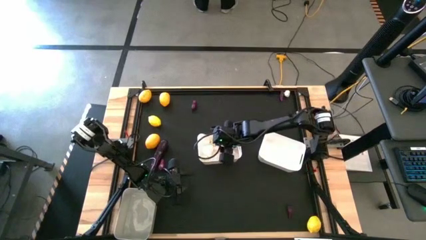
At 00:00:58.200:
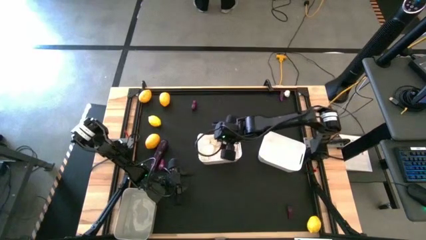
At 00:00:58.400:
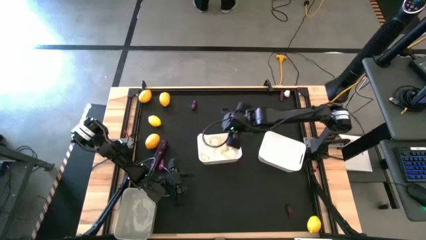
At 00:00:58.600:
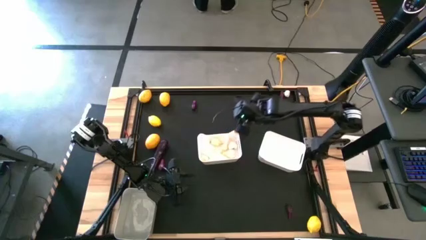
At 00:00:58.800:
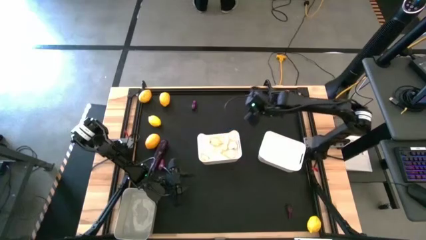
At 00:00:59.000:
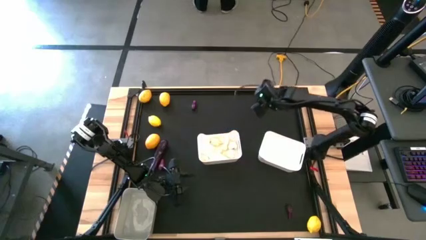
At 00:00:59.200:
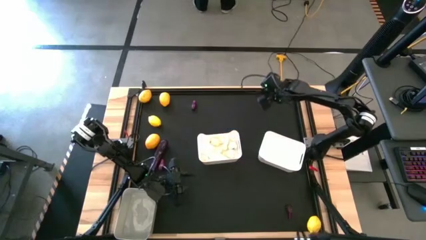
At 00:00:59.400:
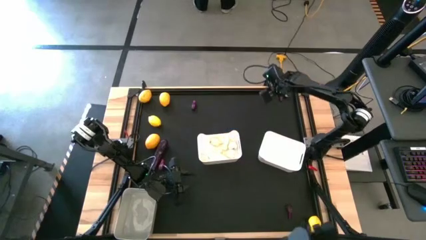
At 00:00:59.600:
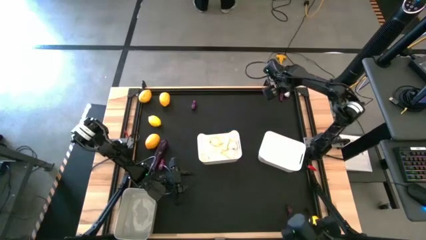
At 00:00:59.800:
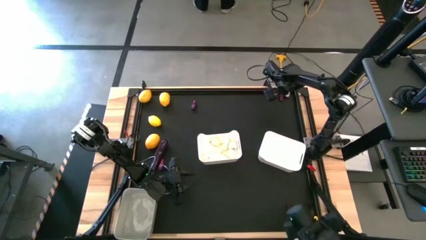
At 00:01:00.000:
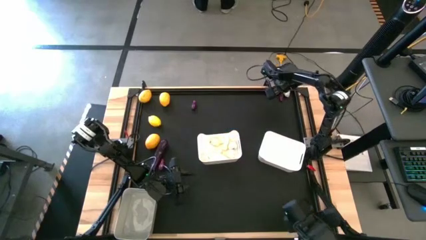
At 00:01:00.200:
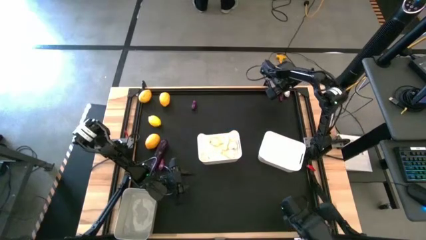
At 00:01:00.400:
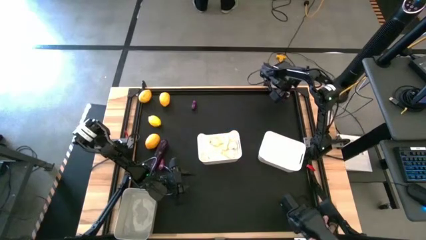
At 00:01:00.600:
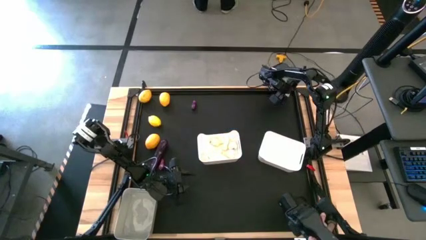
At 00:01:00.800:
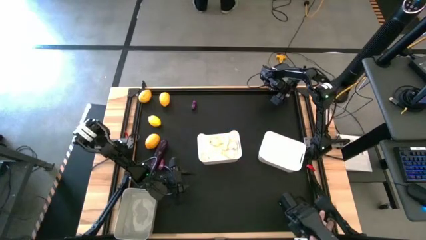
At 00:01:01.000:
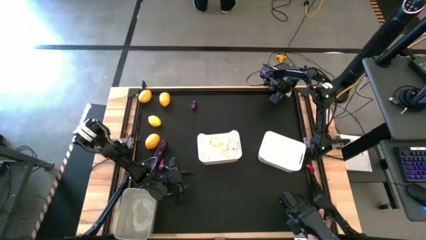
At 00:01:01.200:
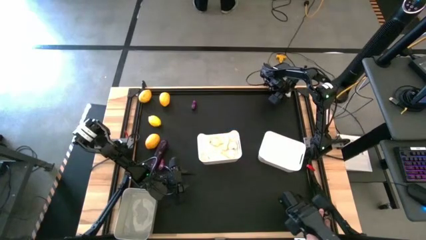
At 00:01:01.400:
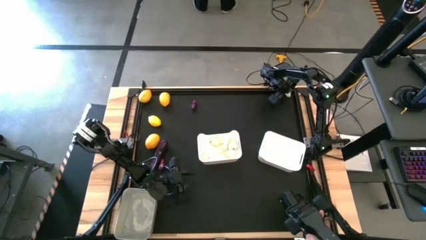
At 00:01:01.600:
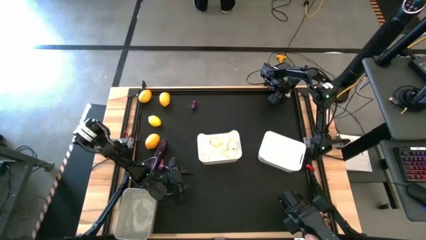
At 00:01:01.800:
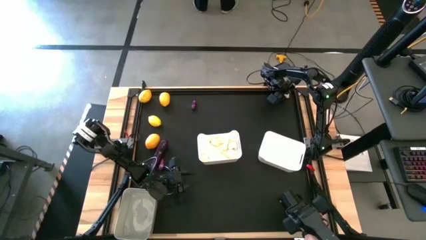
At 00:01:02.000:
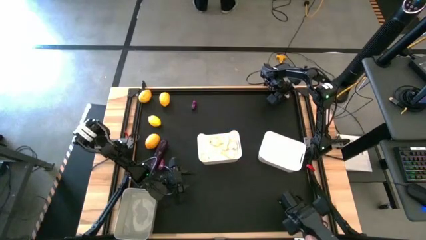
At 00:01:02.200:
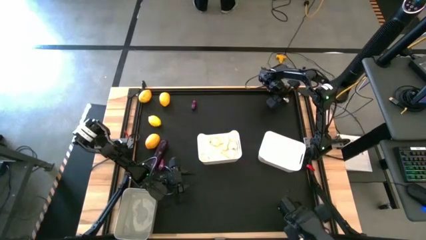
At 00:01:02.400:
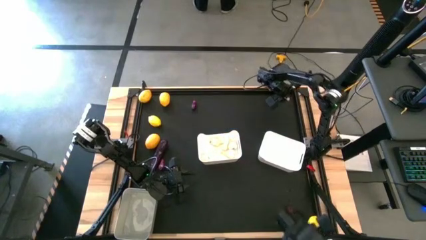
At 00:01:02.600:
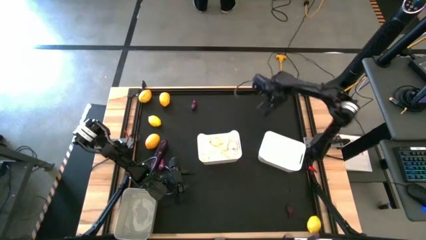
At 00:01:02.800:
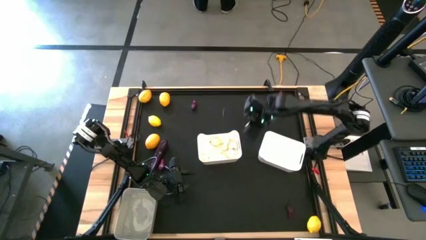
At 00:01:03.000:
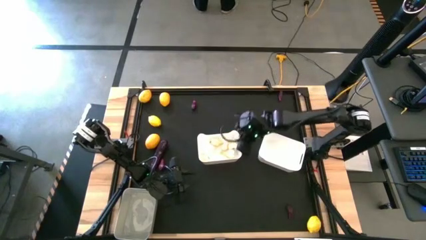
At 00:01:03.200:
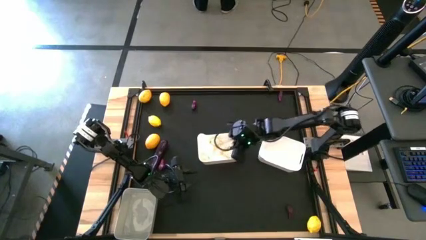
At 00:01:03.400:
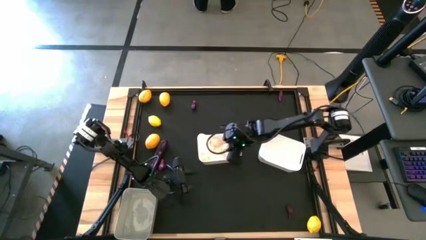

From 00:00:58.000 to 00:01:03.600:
Task: Sort produce into baskets
Put the garlic into the left white bin

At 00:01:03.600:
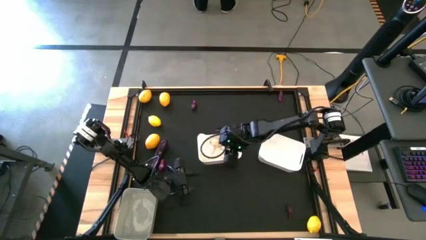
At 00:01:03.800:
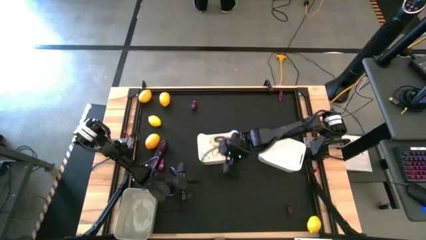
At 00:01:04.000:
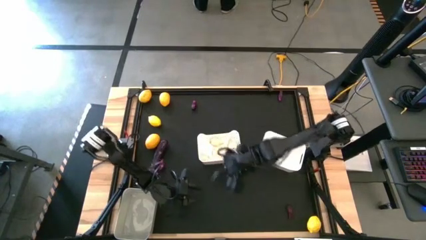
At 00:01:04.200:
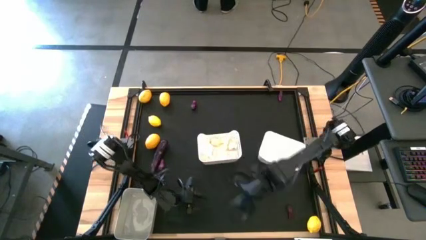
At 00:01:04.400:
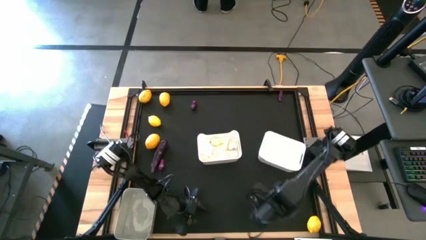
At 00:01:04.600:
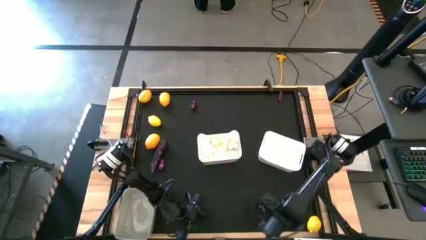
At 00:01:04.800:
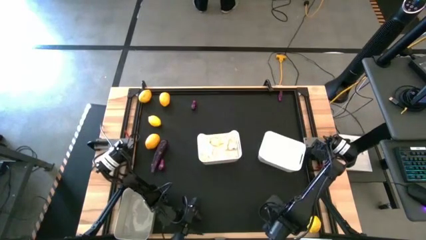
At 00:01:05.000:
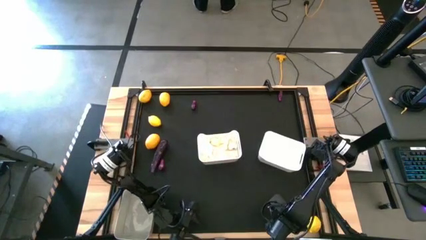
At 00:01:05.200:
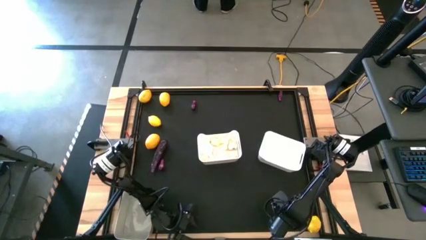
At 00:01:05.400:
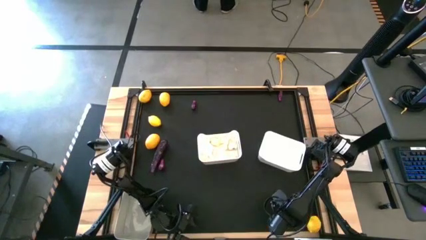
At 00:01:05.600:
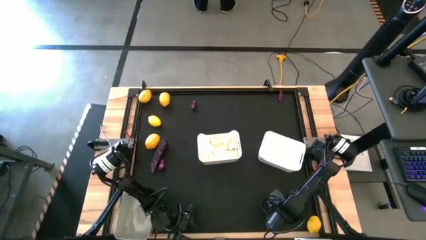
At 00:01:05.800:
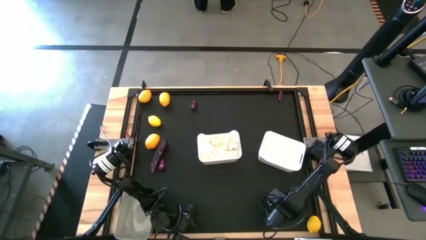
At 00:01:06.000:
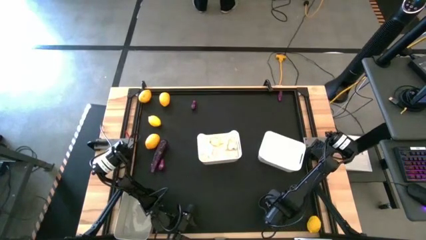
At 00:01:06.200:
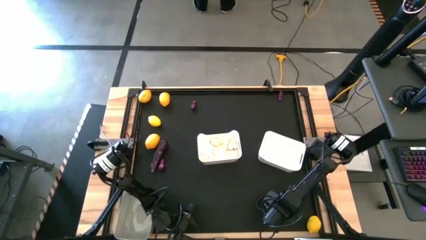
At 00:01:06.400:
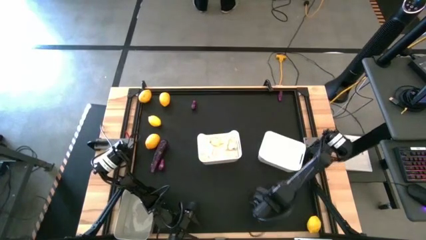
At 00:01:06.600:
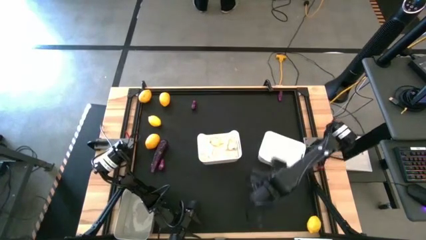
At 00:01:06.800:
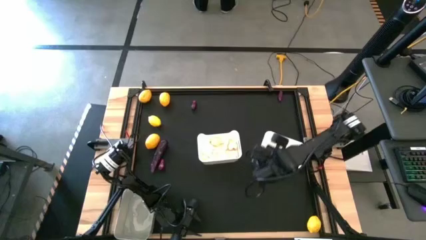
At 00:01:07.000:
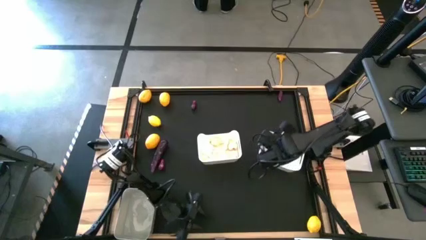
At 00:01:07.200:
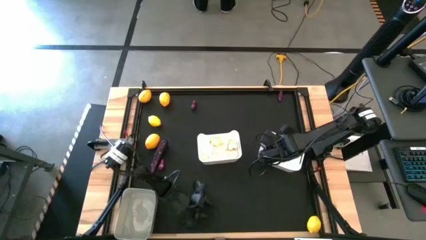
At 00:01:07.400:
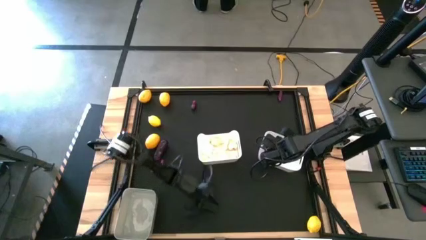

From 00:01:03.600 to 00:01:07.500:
Put the eggplant into the right white bin

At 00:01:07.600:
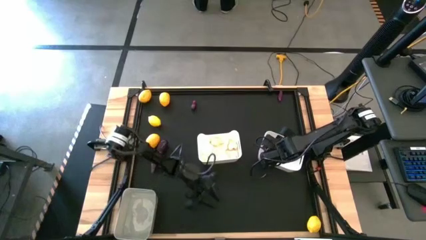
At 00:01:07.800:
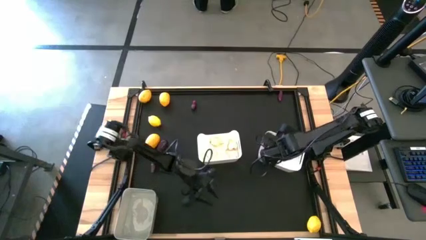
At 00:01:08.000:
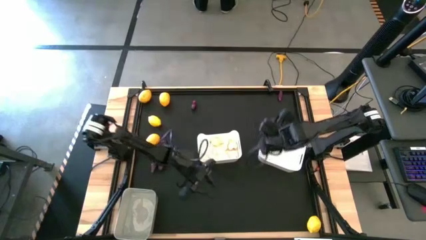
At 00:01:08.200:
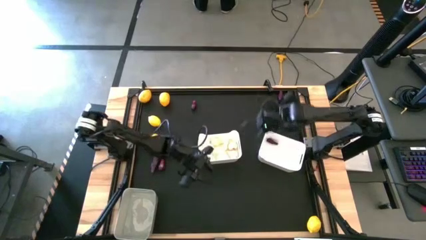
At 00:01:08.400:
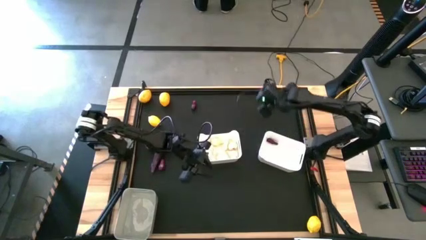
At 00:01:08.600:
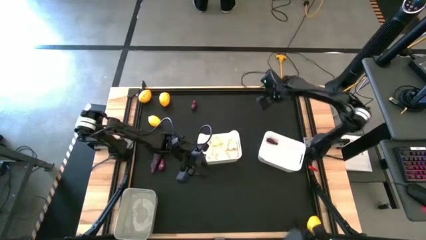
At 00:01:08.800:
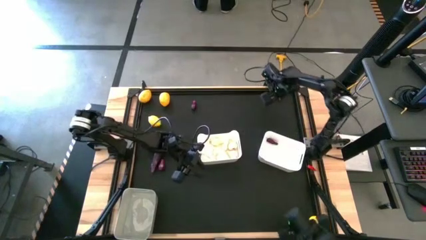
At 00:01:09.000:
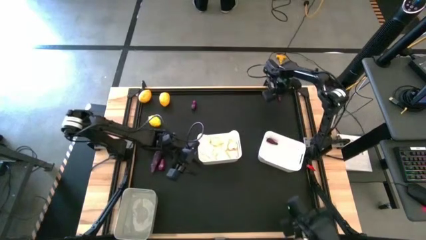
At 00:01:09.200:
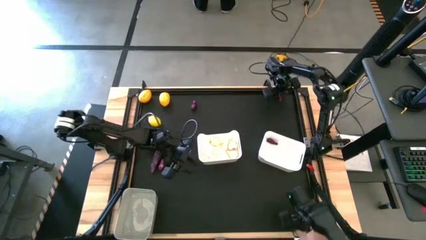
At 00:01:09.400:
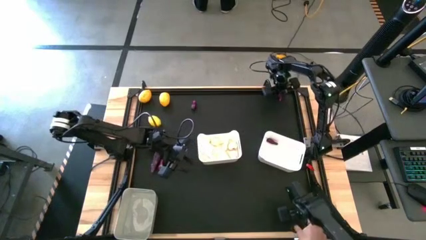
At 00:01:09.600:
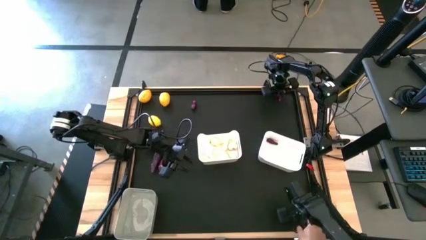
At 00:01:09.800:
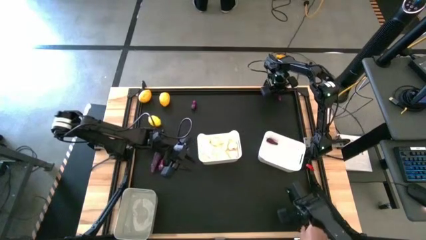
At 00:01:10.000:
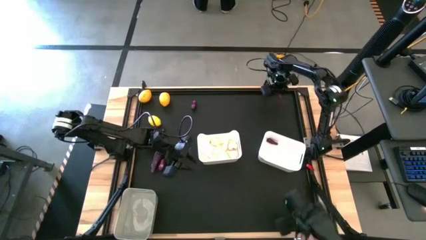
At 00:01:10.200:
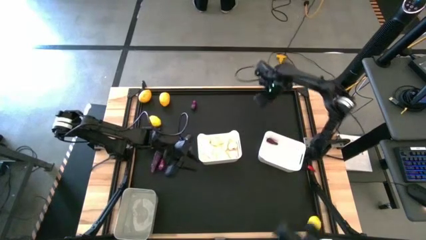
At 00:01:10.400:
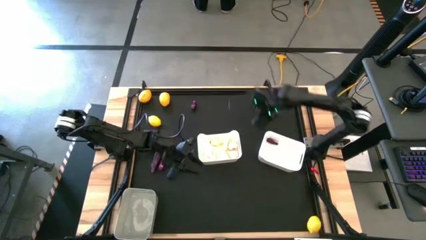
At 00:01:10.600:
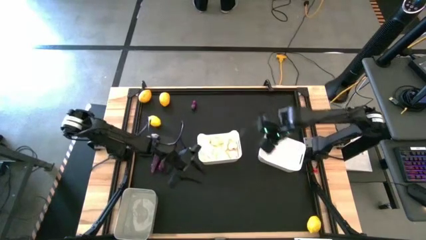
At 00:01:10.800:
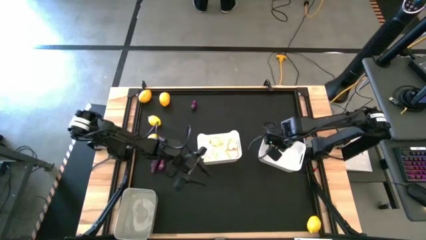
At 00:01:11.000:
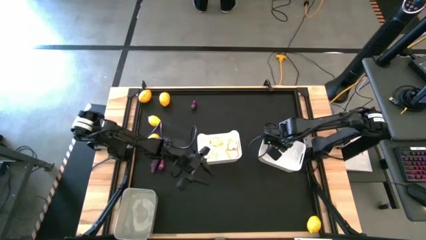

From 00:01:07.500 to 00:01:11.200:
Put the eggplant into the right white bin

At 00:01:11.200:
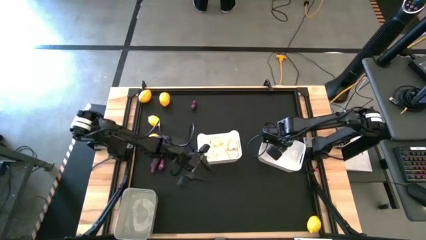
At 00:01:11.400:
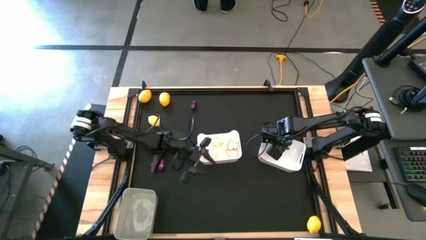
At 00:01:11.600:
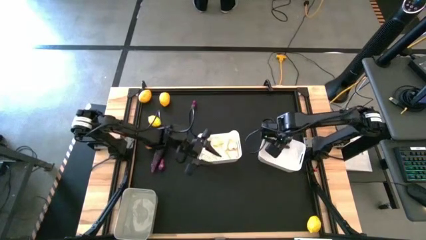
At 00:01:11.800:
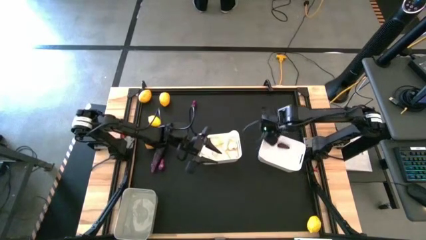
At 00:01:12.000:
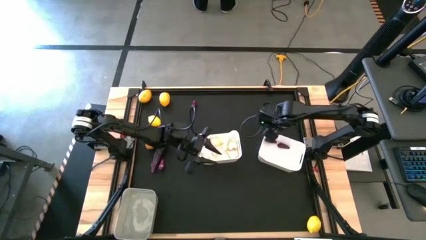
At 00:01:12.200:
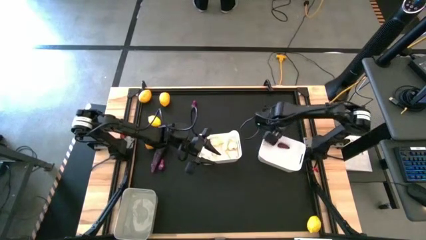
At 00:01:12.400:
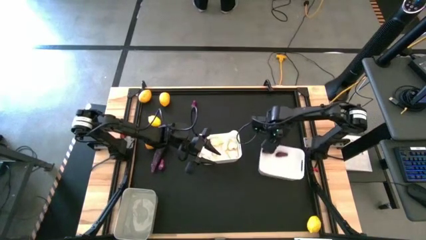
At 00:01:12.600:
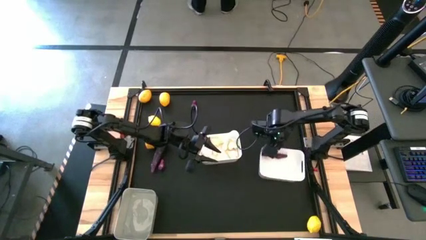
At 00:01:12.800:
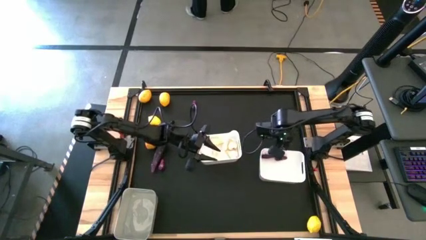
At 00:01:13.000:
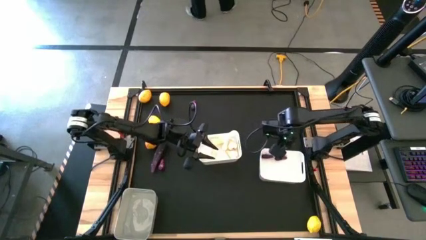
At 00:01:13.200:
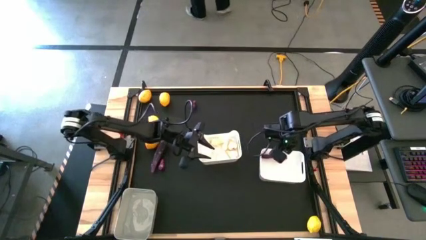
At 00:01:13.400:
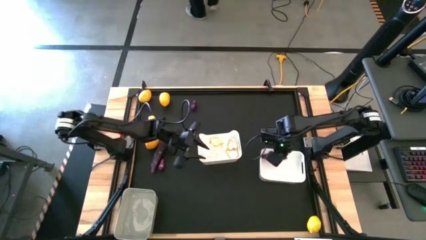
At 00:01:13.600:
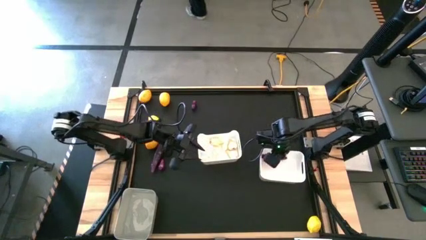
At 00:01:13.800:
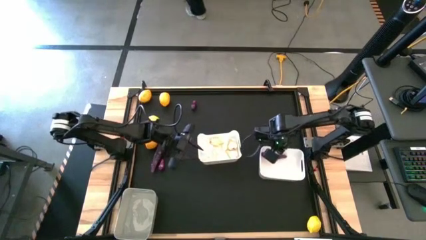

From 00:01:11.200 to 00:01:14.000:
Adjust the right white bin
